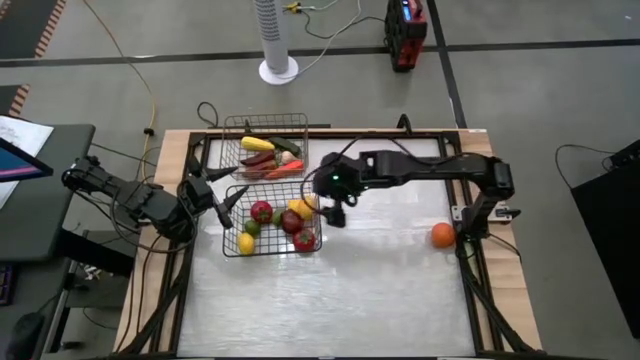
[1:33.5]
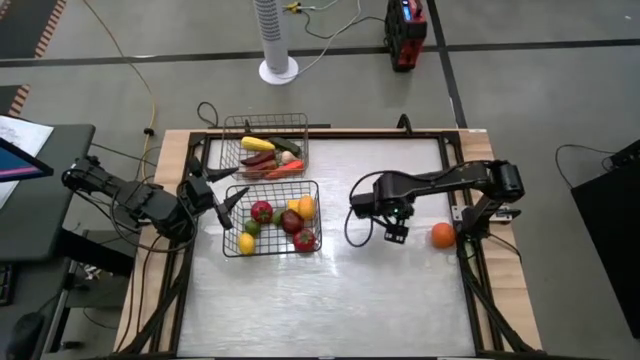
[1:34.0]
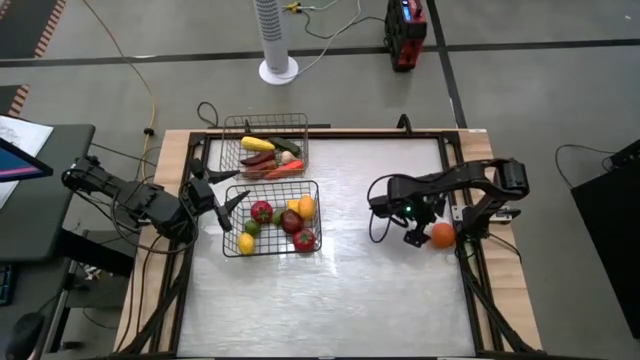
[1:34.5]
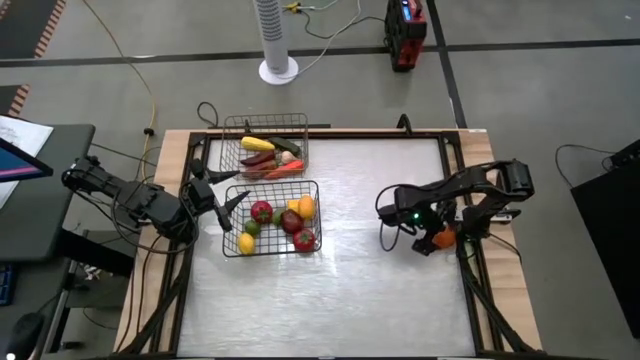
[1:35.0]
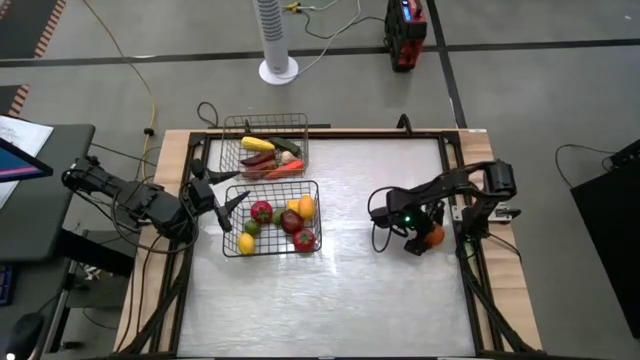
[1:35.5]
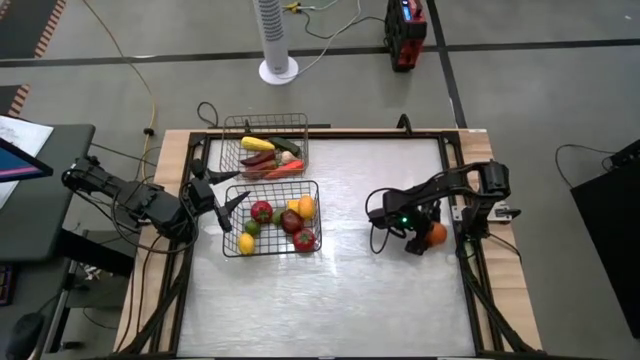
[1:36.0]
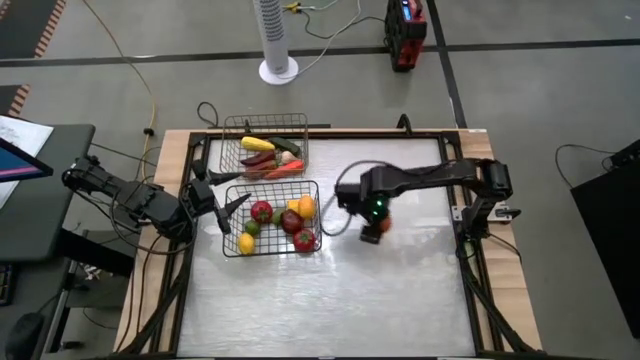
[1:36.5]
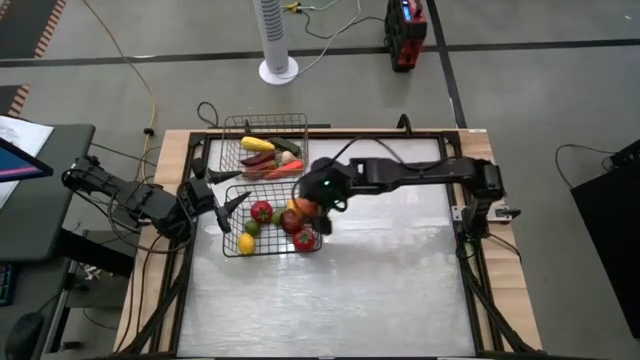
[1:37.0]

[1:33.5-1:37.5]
Task: Sort produce into baskets
Put the orange into the bottom wire basket

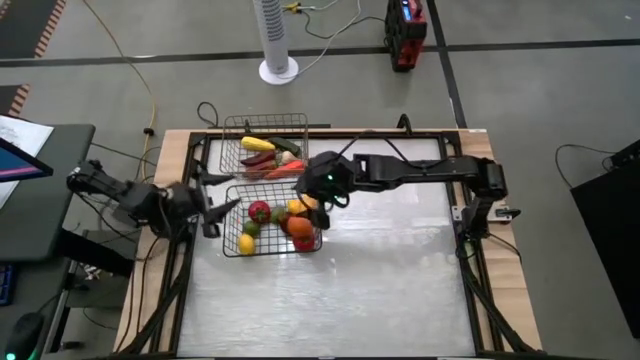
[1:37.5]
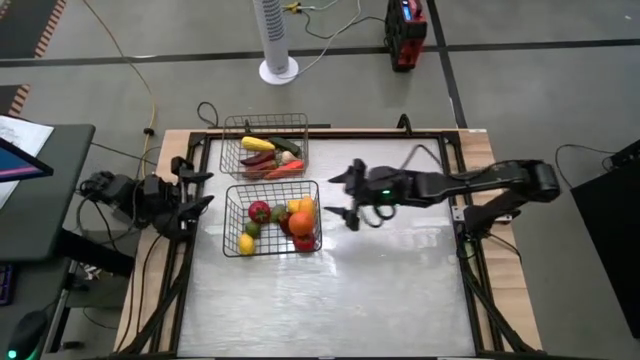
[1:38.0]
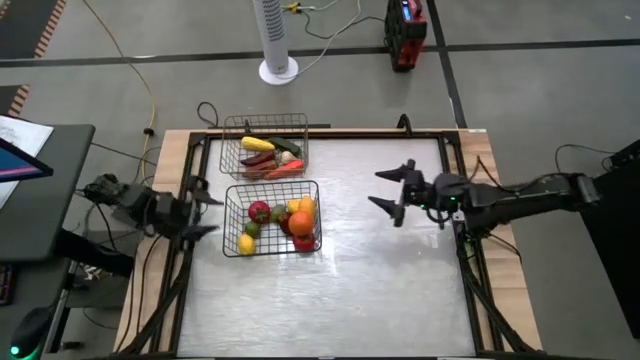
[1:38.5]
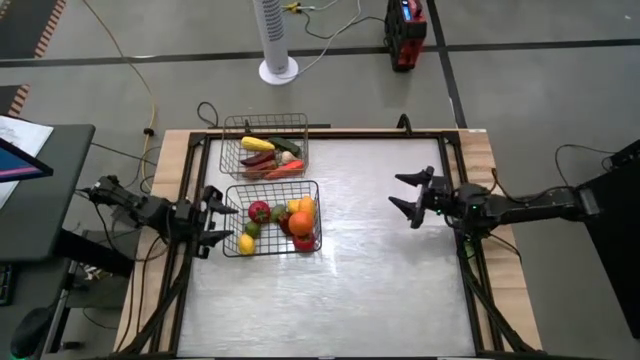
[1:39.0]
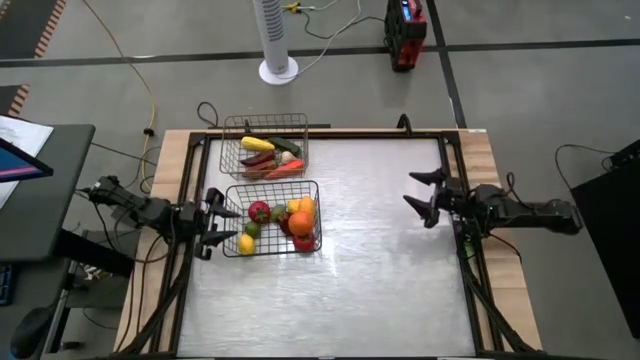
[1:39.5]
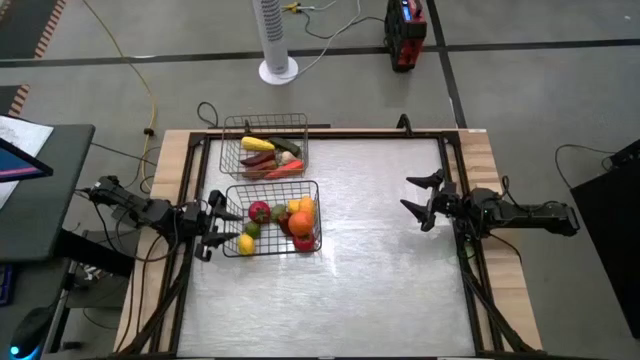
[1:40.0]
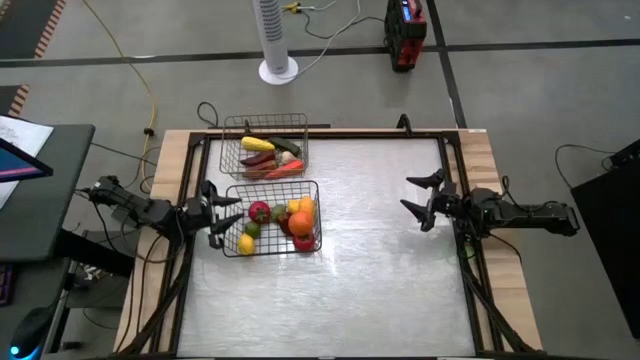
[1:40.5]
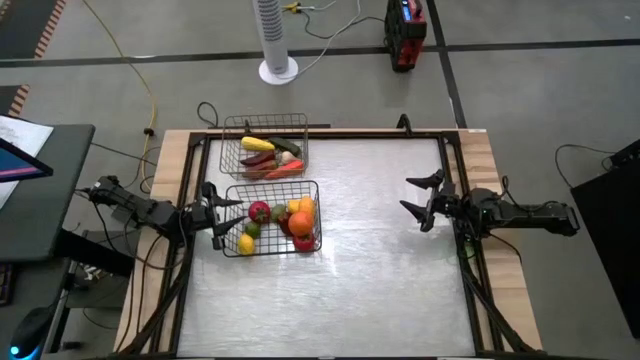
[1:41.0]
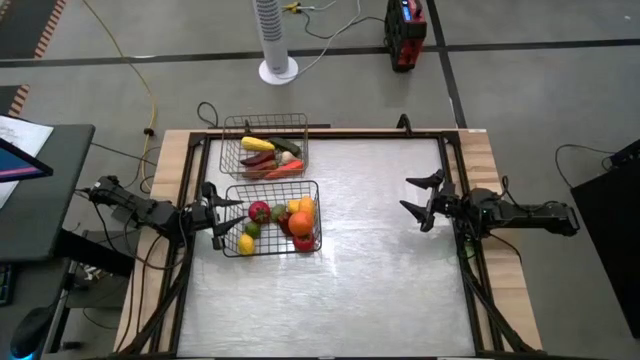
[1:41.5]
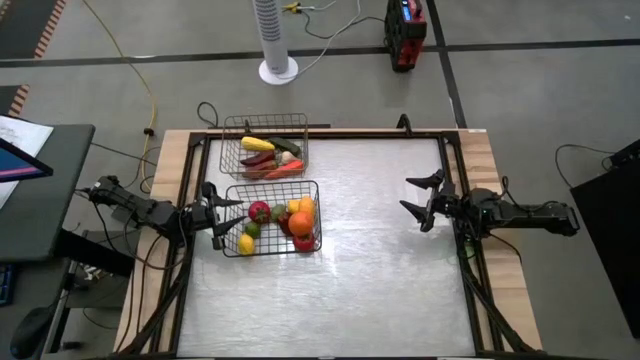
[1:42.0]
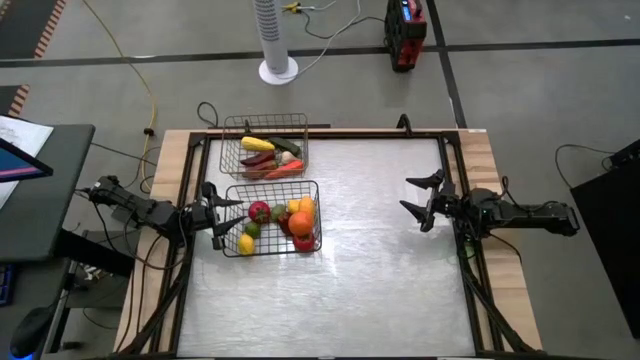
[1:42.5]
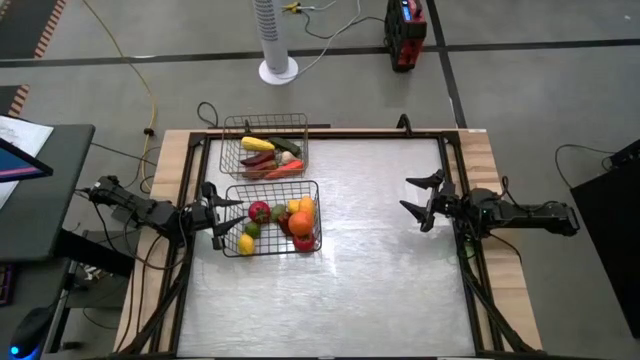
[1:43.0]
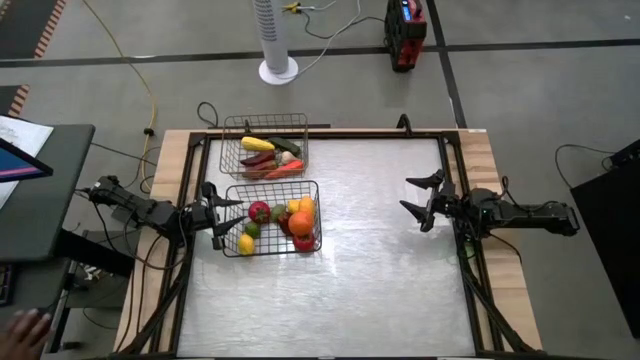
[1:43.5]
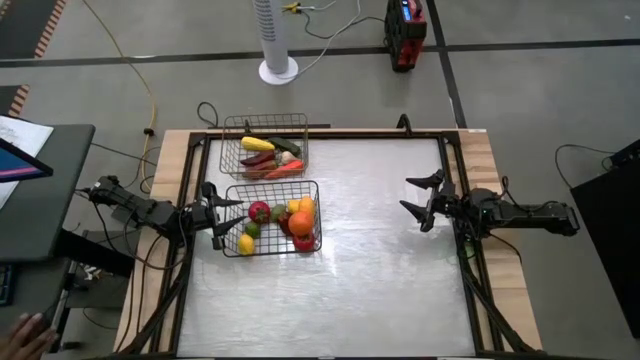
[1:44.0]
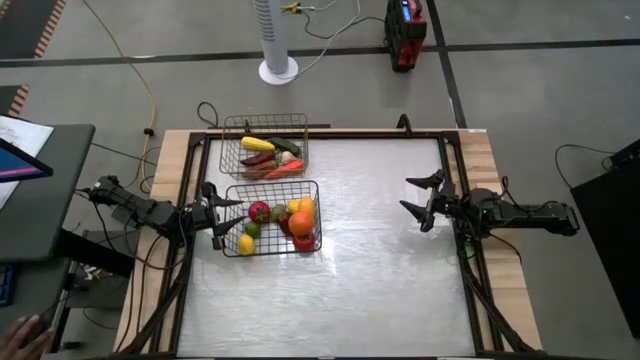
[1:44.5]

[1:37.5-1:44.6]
Return to Home Position

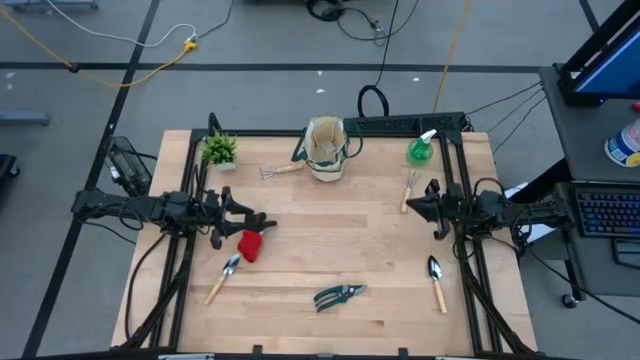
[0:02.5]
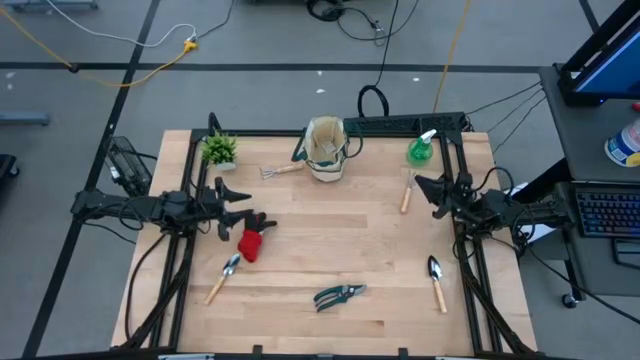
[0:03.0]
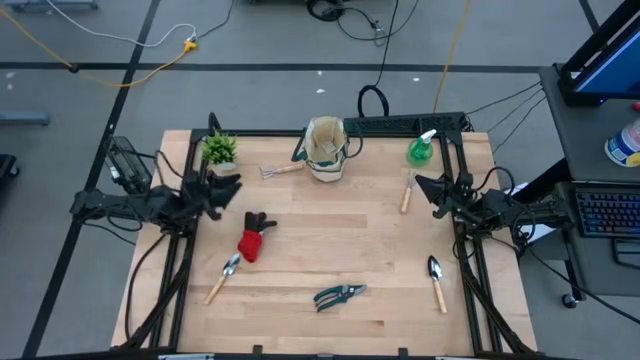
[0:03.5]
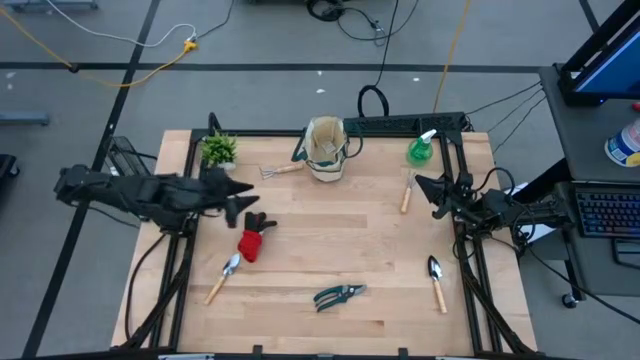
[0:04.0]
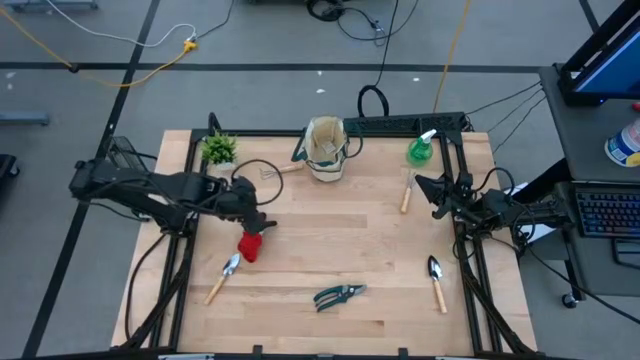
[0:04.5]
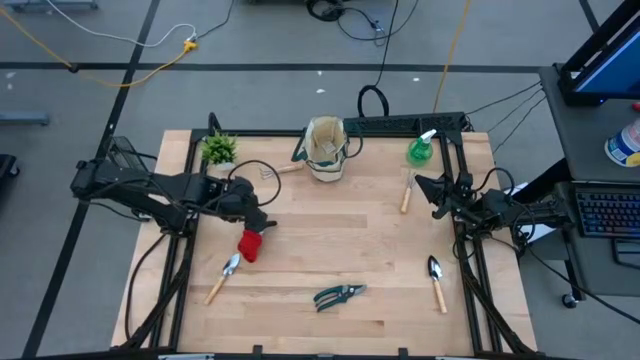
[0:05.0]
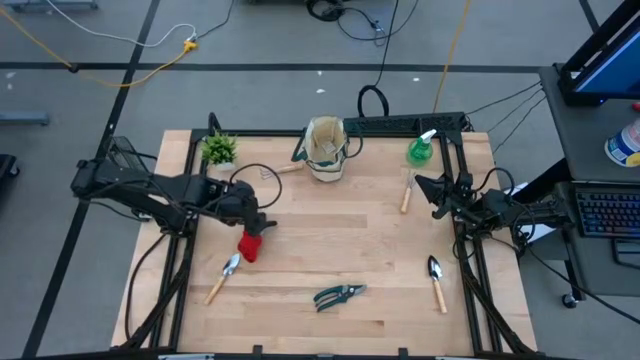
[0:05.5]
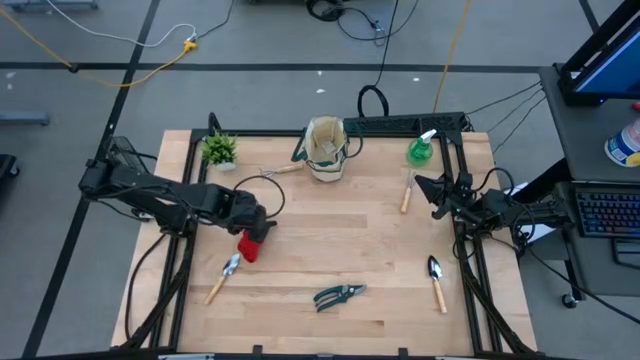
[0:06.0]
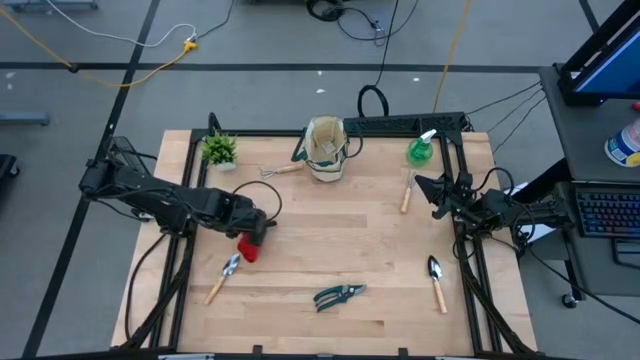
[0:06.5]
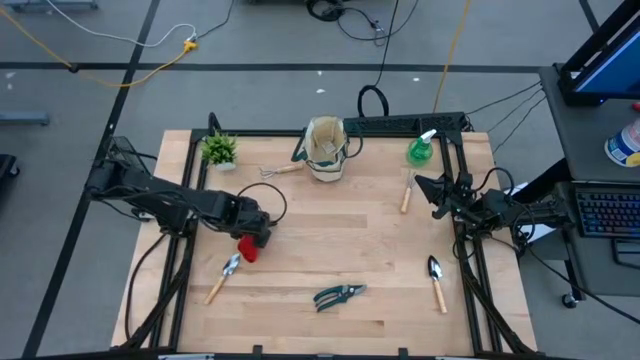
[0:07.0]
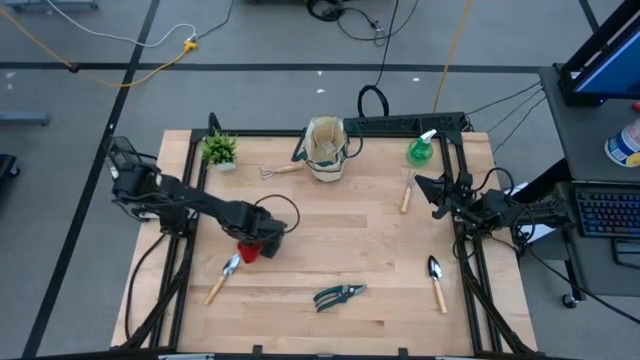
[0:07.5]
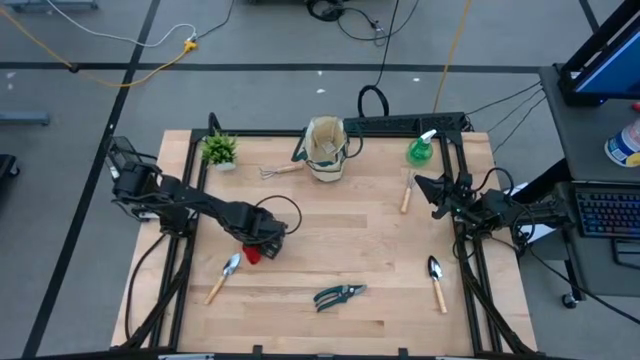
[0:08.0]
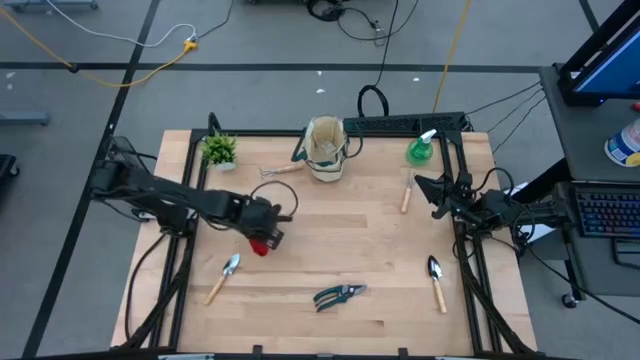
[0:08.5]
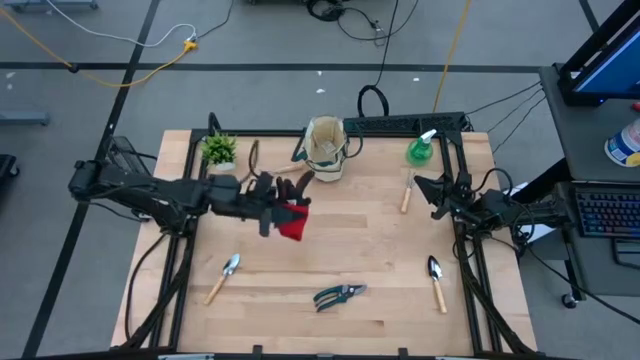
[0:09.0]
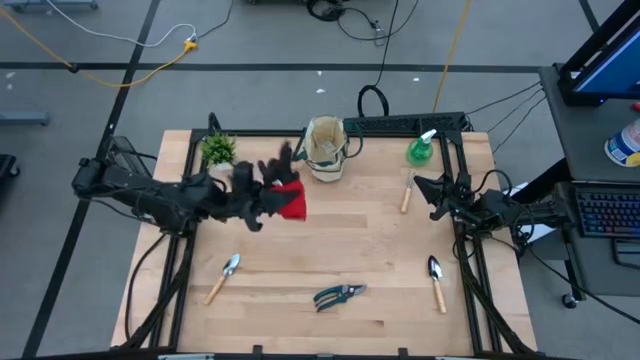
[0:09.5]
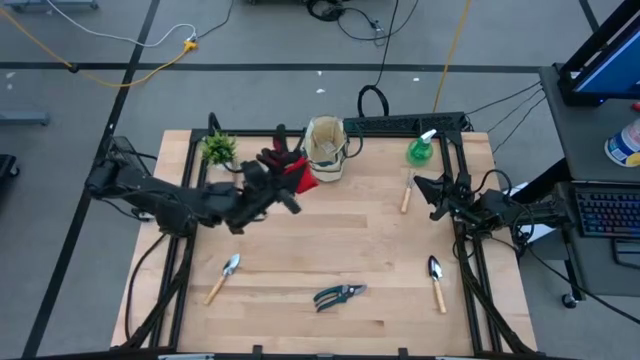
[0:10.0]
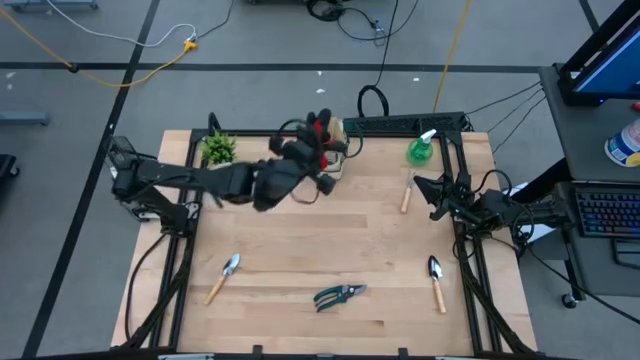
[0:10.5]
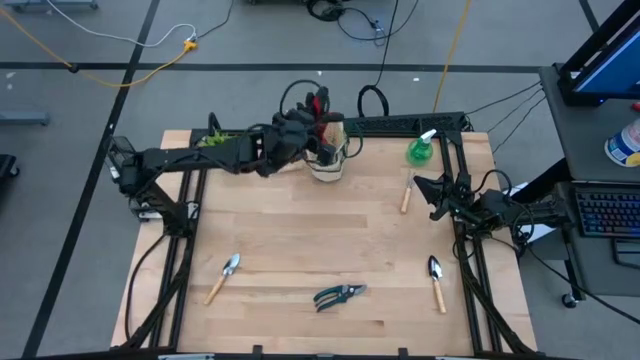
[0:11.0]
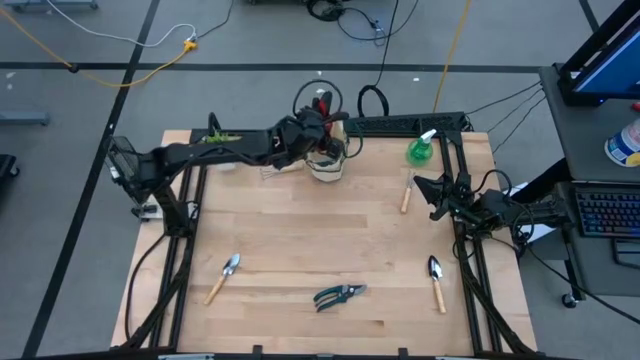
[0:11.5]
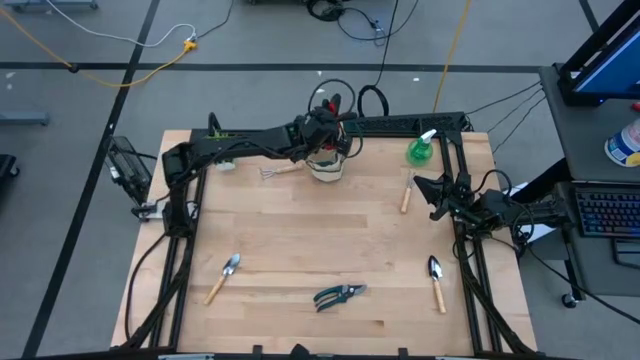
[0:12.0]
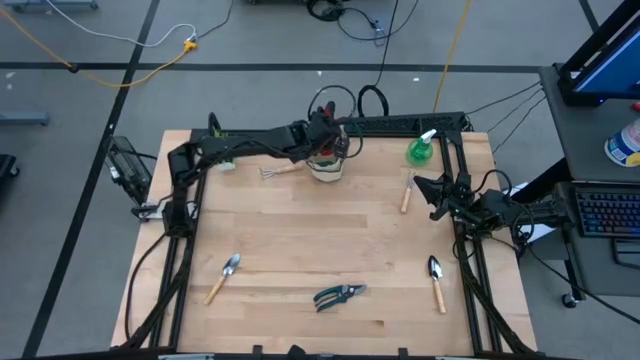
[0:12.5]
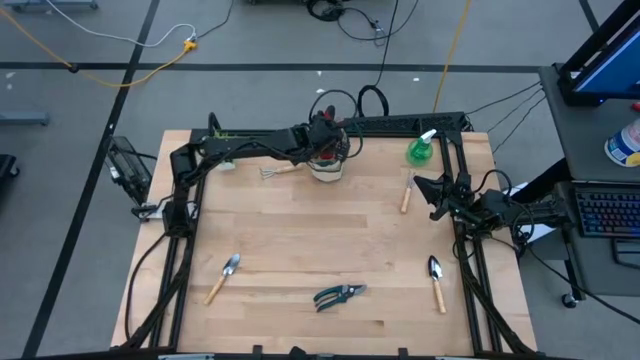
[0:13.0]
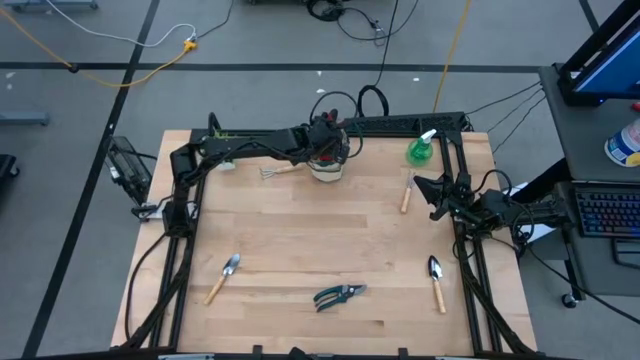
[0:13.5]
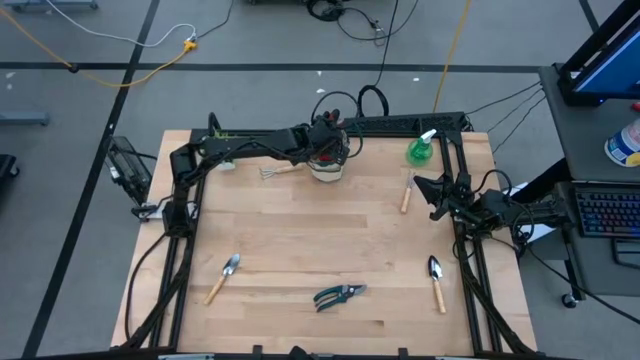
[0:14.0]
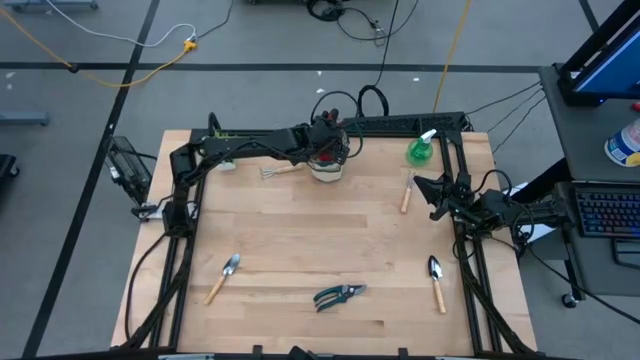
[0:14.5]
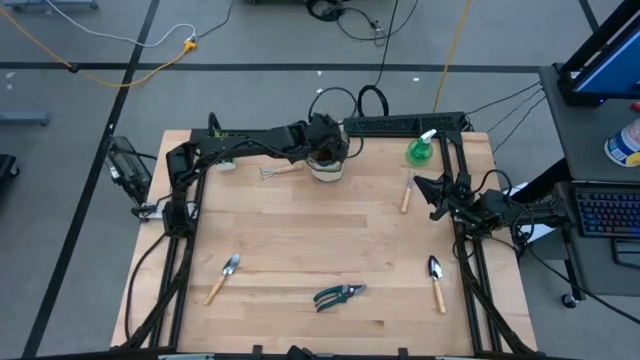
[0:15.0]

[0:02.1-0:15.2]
Task: Pick & Place Garden tools in Gardening bag
Put the black gloves into the green gardening bag
